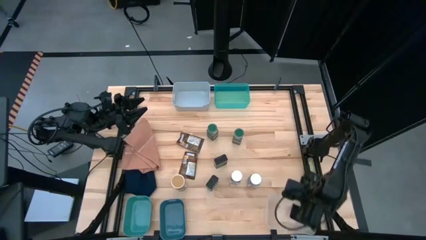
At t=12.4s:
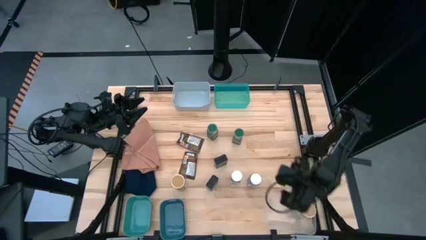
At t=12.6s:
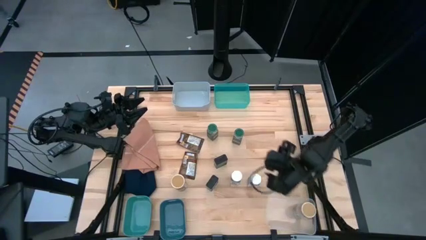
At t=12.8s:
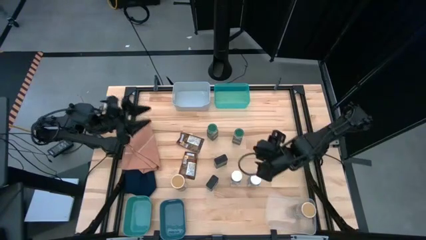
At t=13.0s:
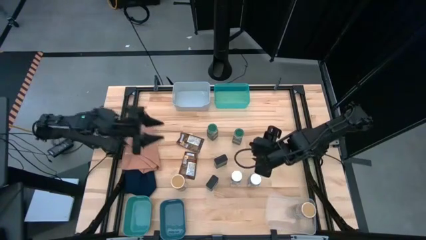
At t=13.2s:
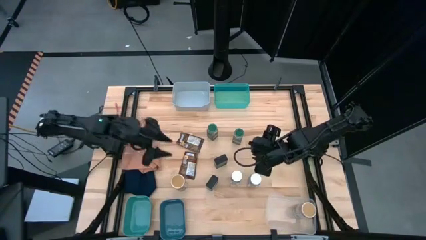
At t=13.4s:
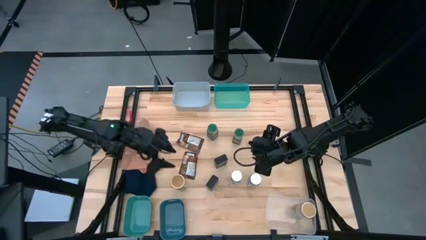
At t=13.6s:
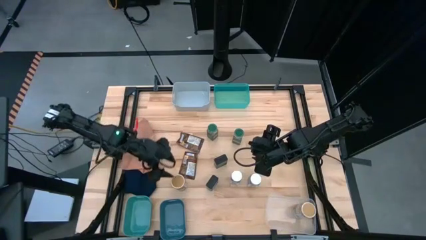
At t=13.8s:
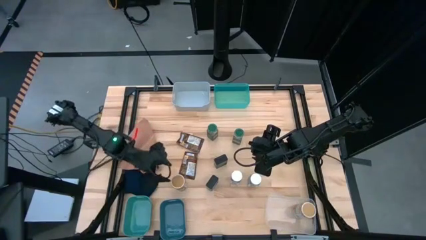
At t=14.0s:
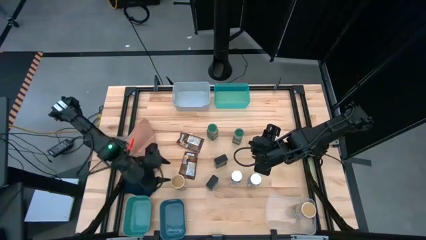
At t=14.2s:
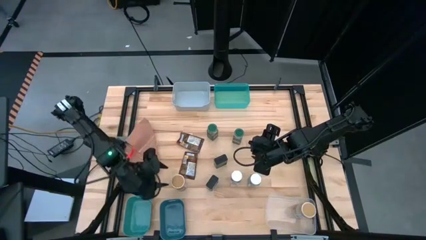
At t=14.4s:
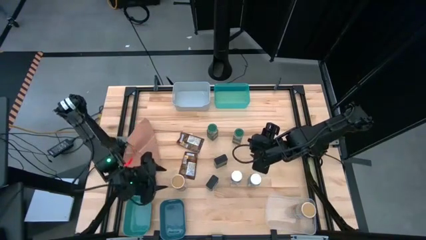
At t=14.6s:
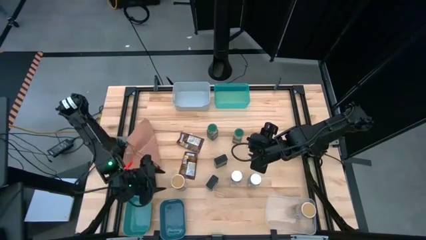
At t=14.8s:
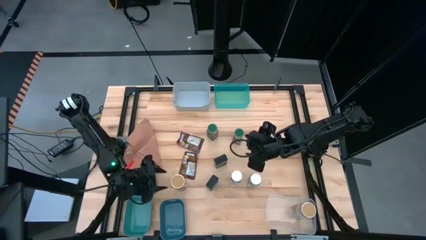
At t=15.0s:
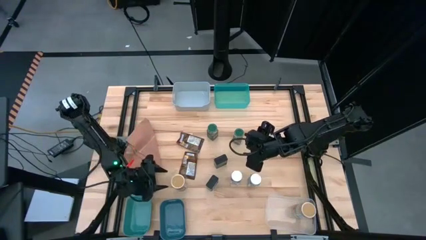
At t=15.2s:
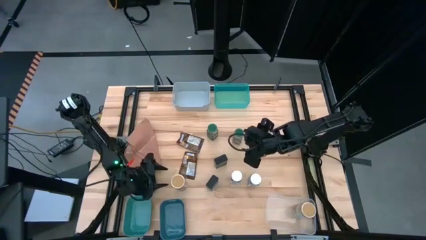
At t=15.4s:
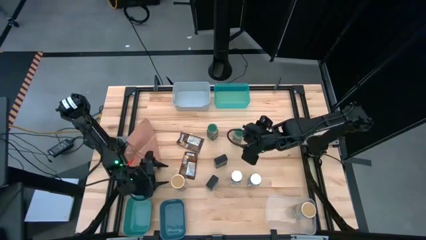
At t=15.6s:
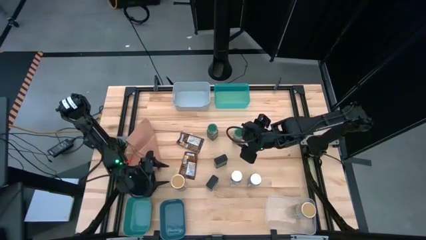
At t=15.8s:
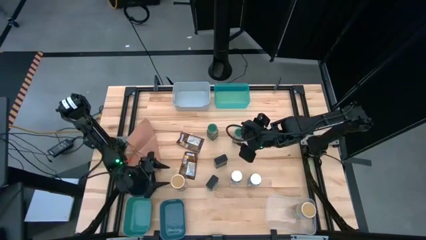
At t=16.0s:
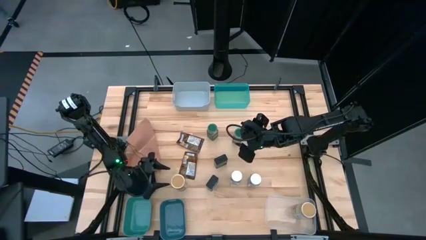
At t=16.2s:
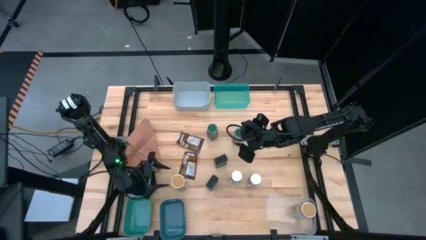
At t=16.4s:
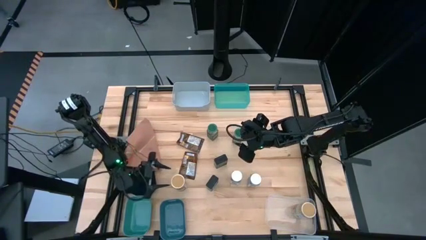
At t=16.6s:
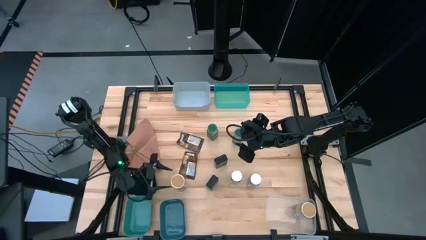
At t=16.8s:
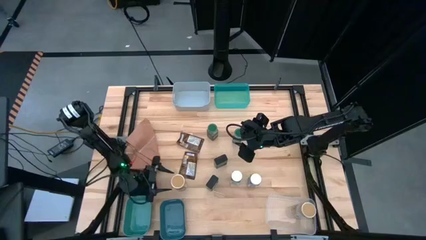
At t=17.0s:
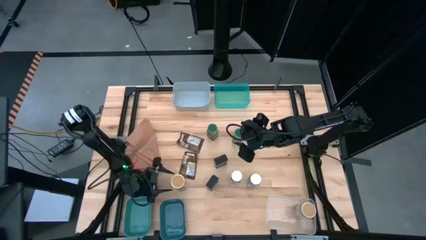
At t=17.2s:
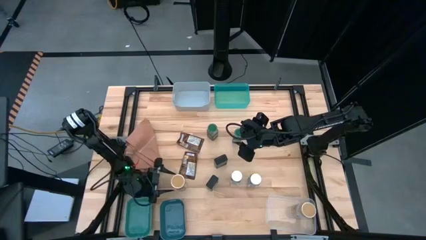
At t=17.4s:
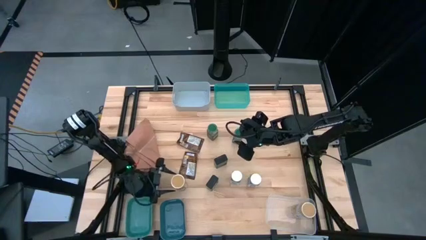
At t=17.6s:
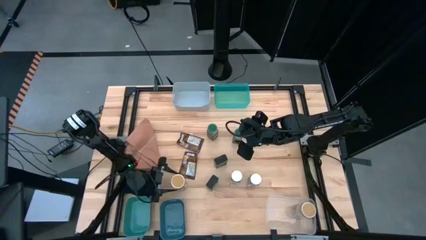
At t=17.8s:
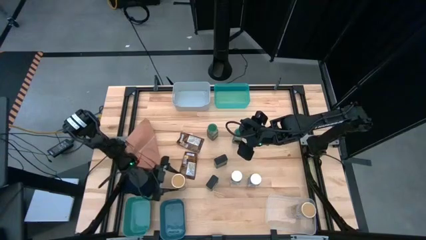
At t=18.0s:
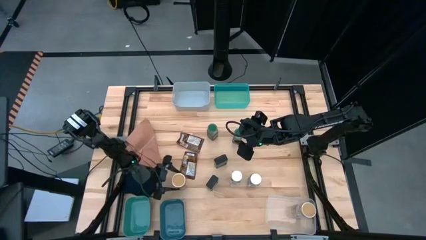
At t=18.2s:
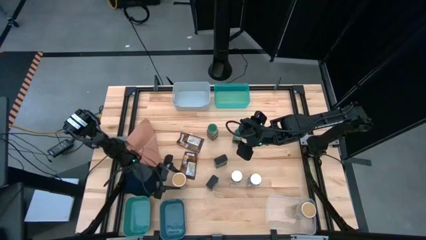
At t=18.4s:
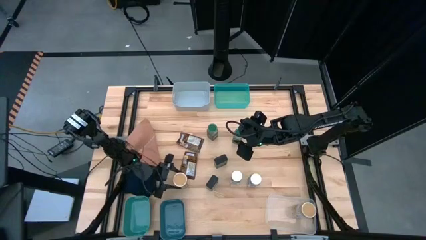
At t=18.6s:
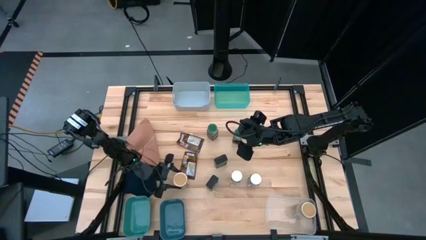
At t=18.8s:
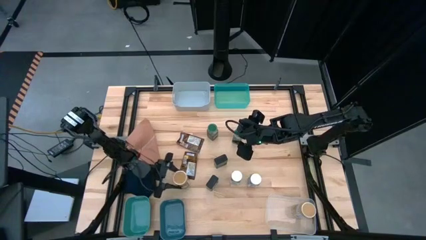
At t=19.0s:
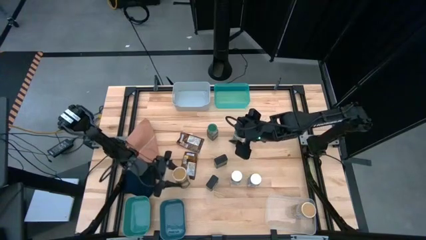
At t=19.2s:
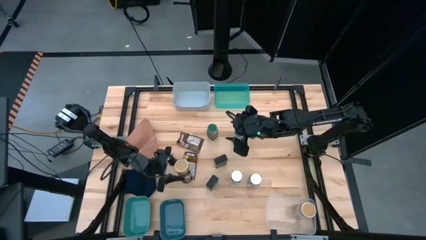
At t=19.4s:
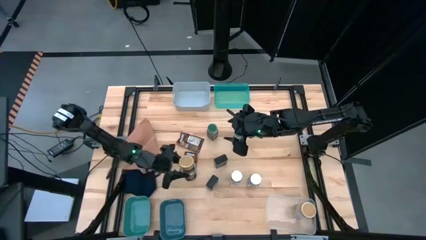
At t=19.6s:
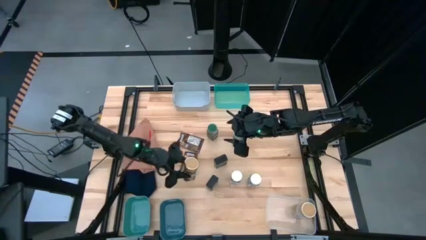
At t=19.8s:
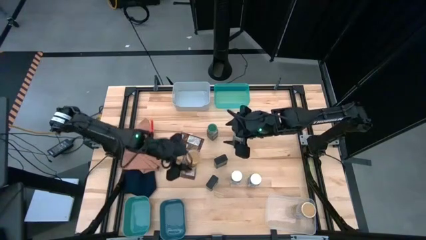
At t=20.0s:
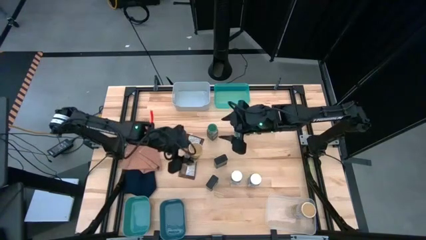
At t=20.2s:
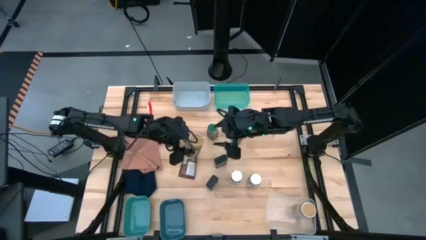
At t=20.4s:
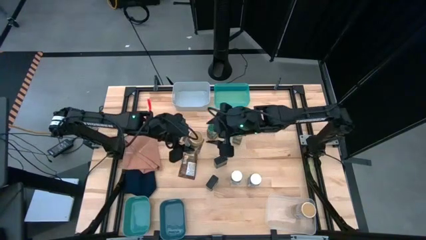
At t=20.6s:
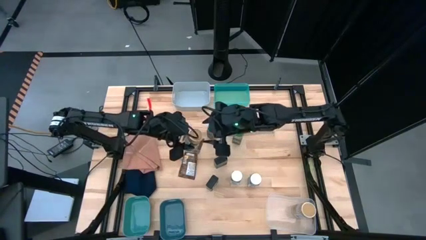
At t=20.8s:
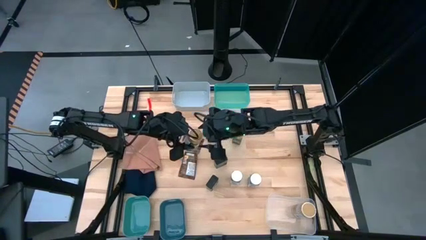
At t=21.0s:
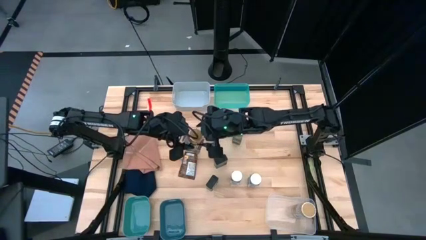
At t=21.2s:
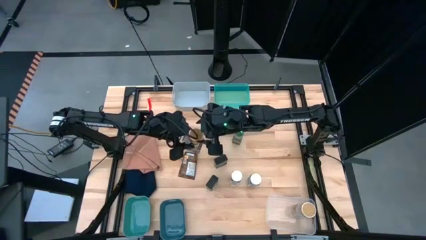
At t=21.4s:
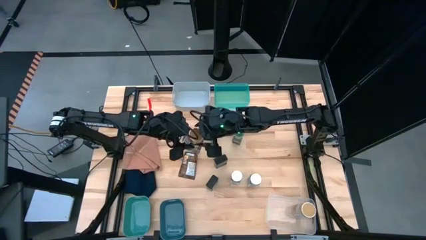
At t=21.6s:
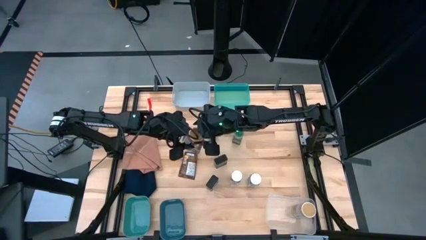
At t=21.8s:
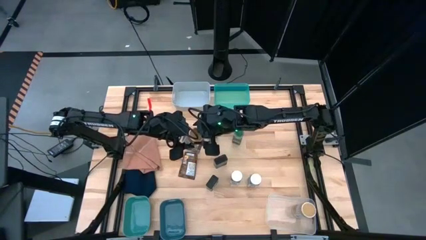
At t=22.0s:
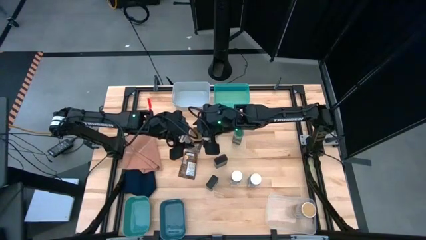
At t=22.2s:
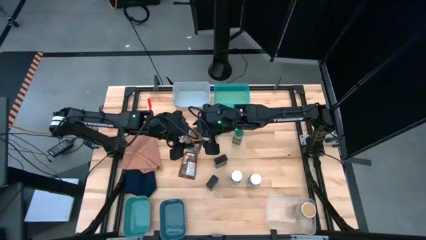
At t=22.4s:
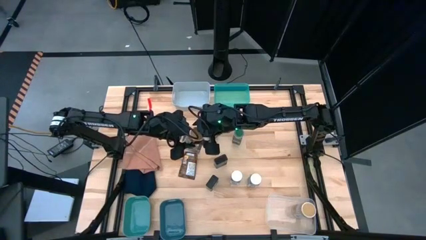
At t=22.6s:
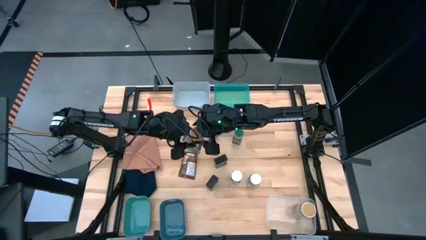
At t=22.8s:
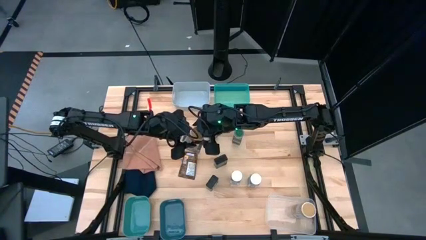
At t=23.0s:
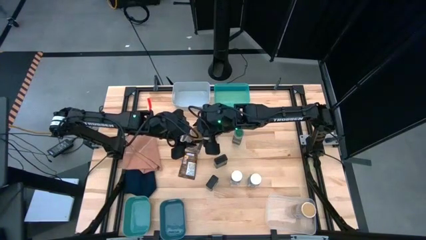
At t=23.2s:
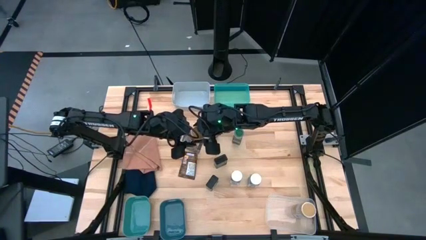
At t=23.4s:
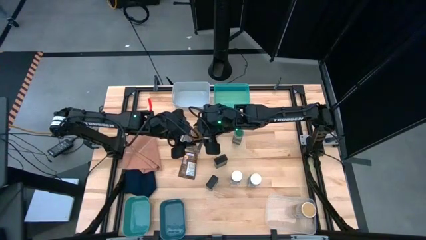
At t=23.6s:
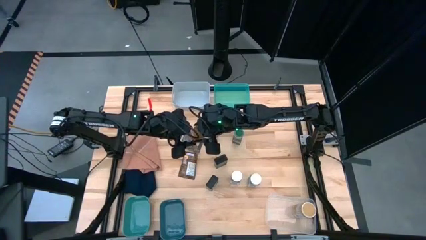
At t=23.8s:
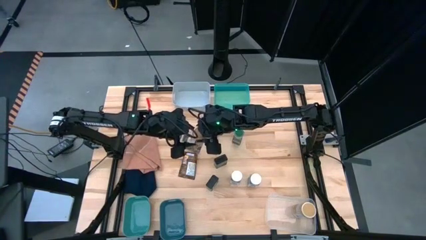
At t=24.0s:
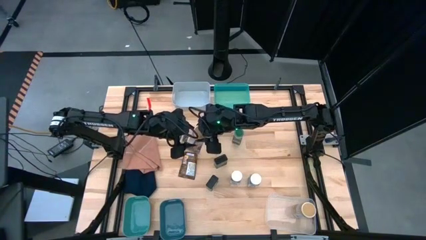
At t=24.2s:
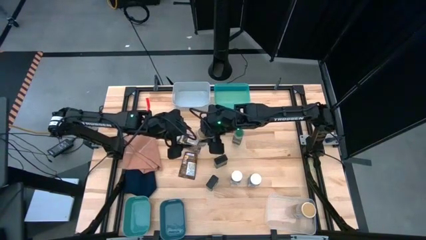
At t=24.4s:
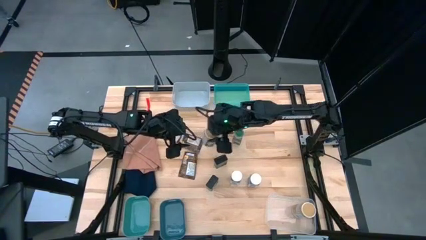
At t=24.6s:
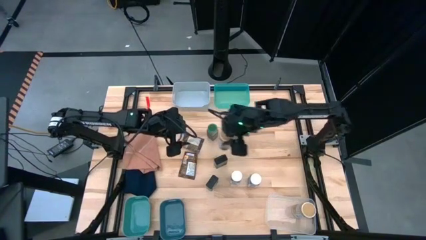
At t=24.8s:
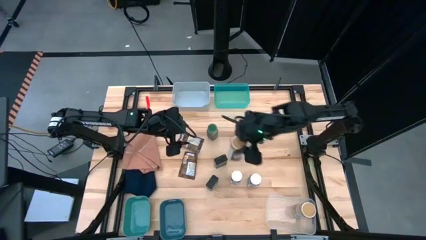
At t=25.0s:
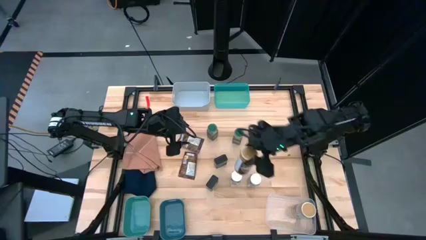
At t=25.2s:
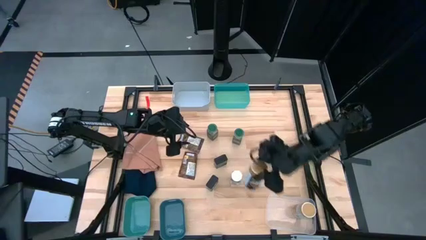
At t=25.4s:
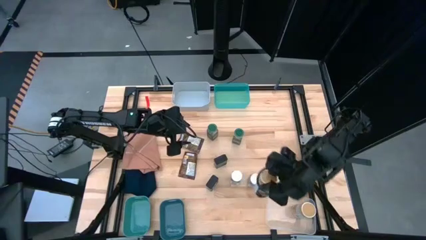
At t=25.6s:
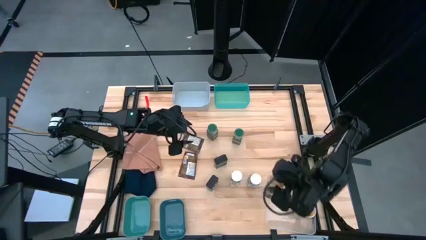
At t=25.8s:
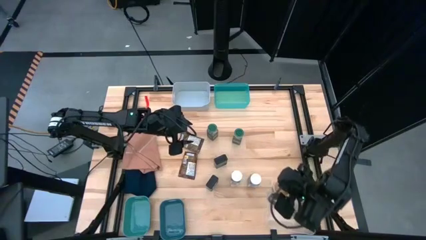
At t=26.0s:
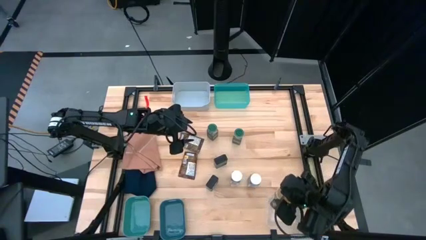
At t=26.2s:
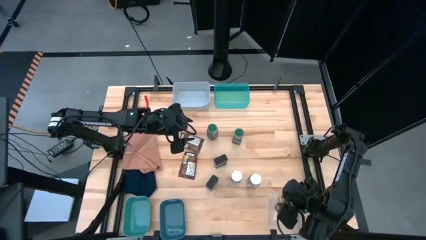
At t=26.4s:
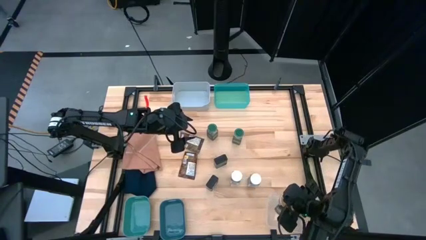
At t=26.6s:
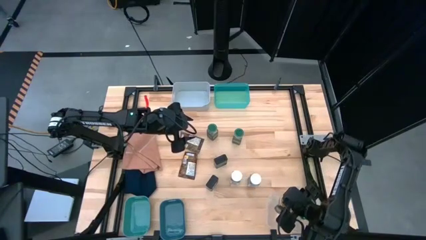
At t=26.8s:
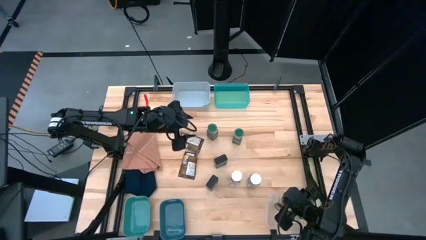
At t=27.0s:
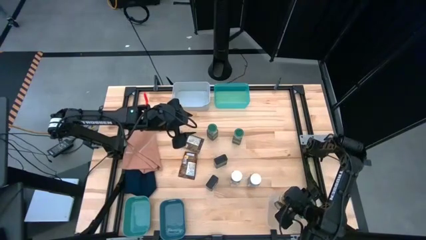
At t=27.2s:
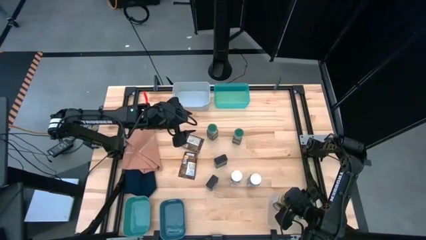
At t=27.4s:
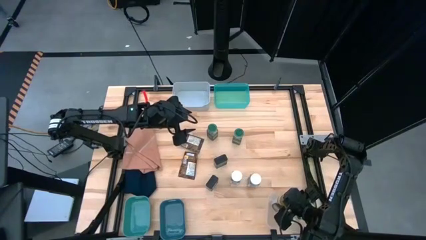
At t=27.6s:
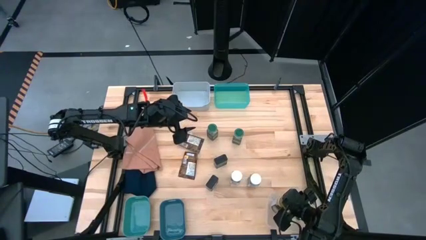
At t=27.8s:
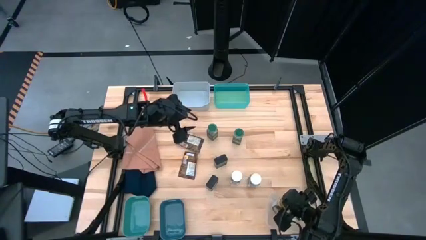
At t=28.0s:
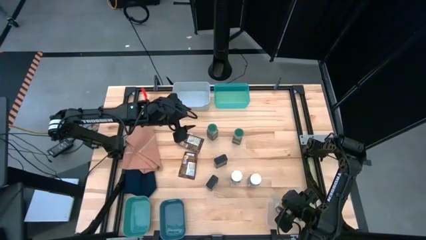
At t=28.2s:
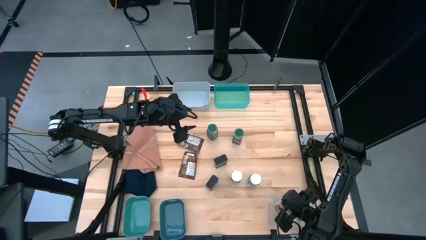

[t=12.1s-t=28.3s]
Task: Sort spices by type
Put the gold spice bottle into the transparent bin
